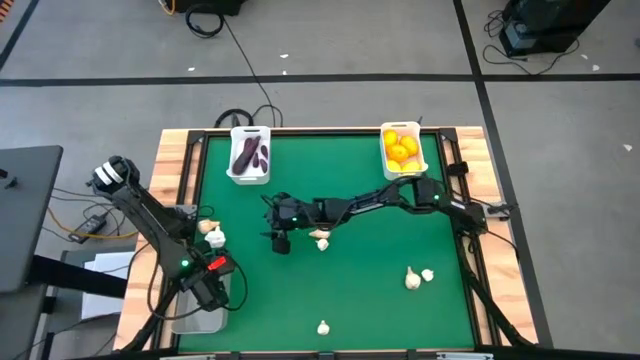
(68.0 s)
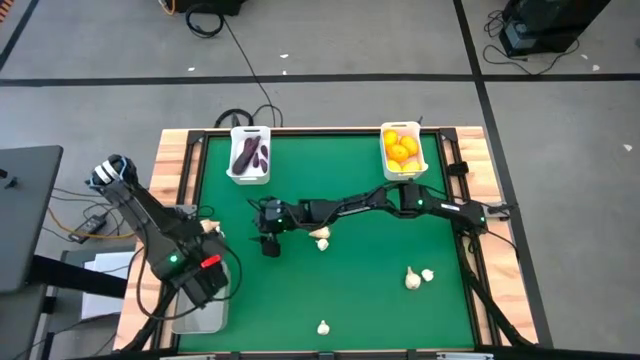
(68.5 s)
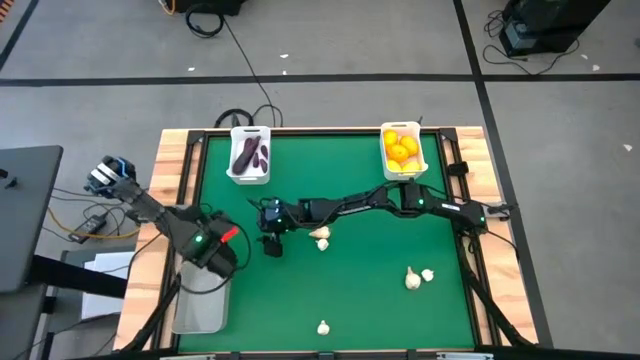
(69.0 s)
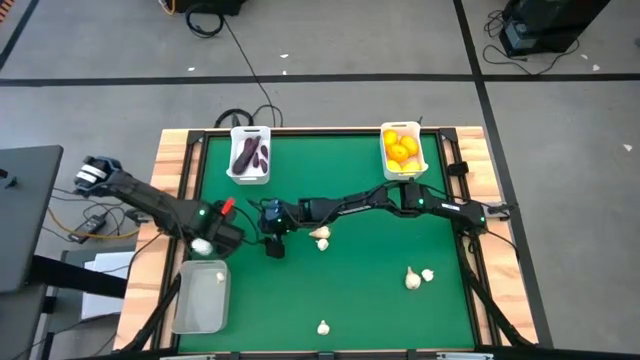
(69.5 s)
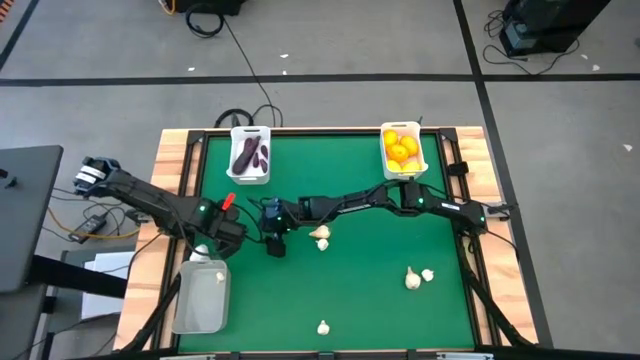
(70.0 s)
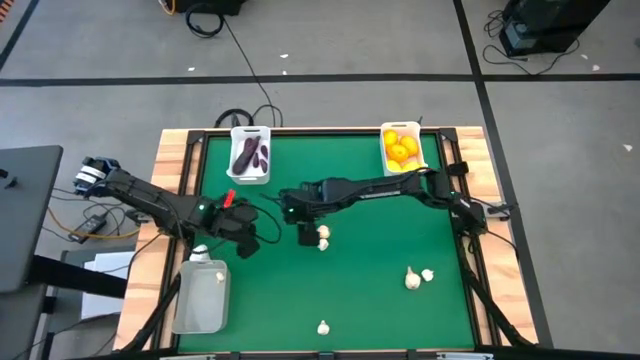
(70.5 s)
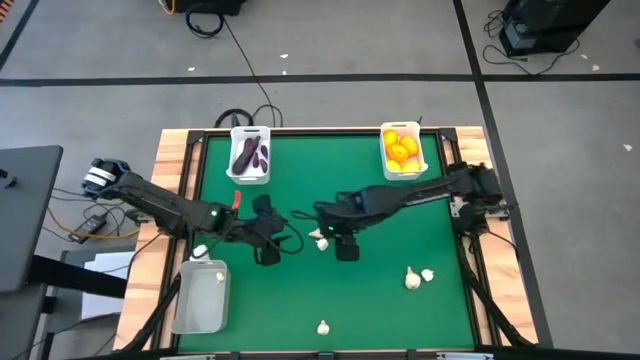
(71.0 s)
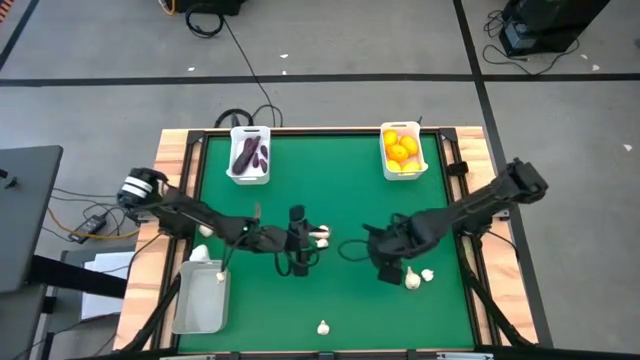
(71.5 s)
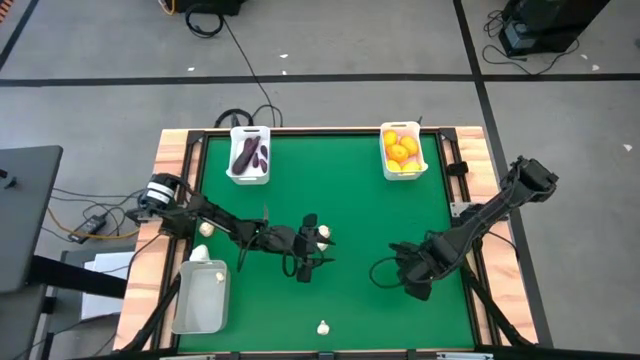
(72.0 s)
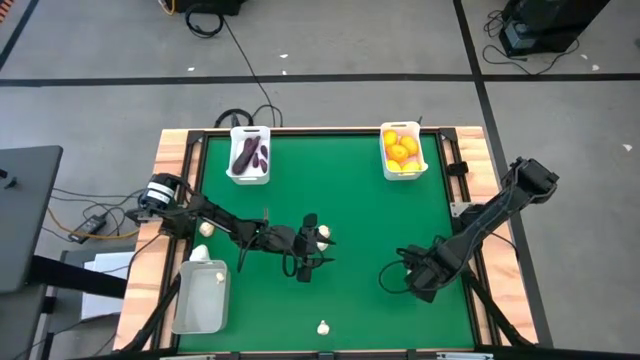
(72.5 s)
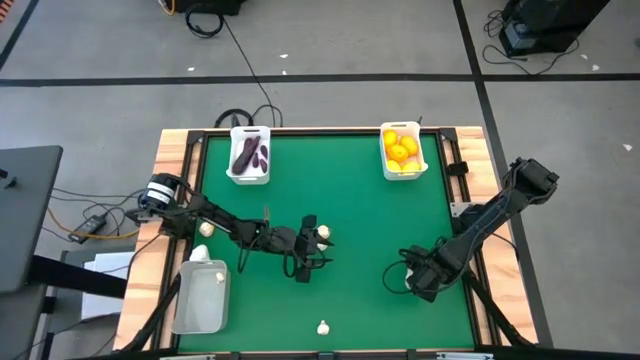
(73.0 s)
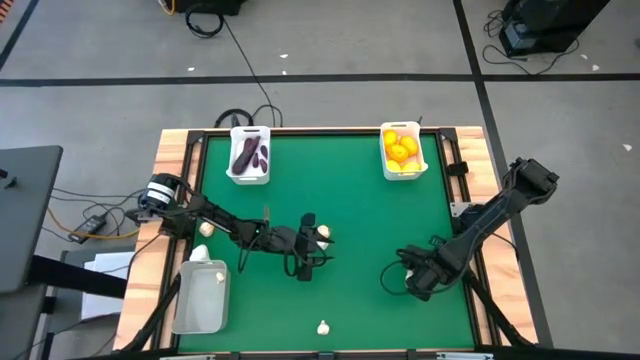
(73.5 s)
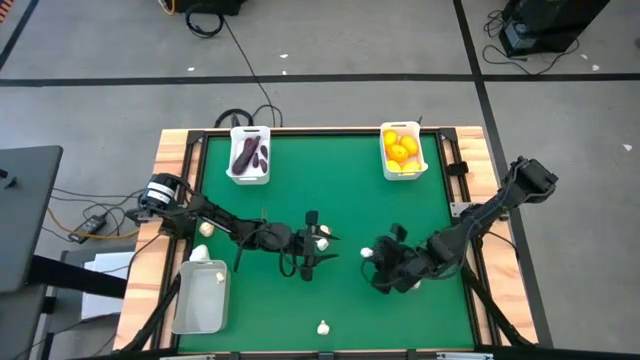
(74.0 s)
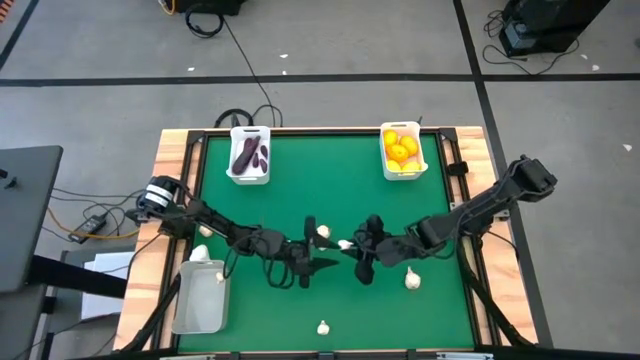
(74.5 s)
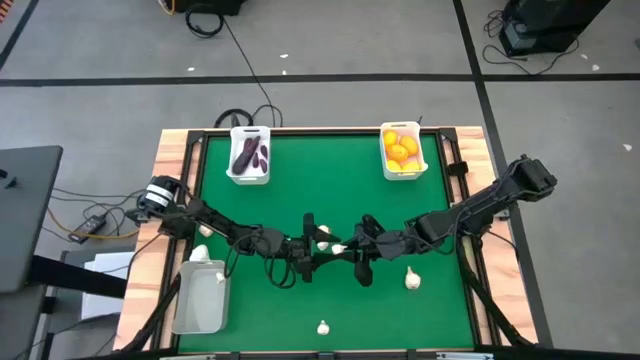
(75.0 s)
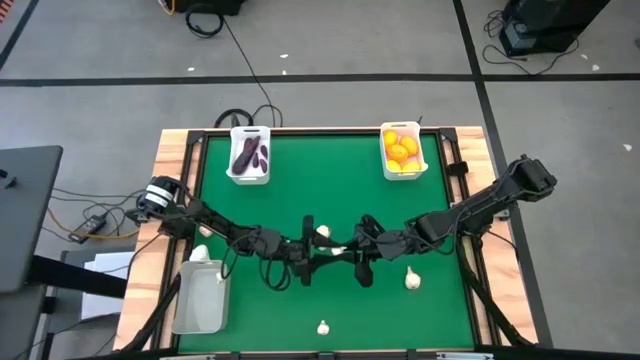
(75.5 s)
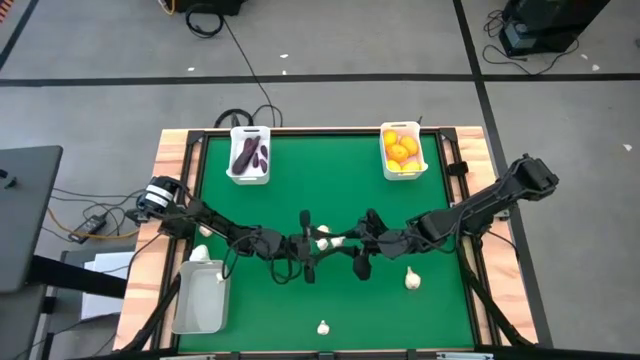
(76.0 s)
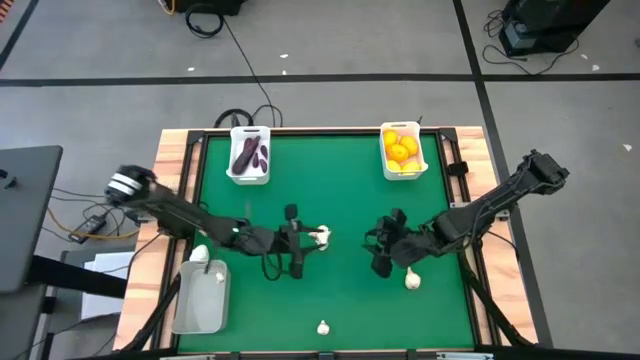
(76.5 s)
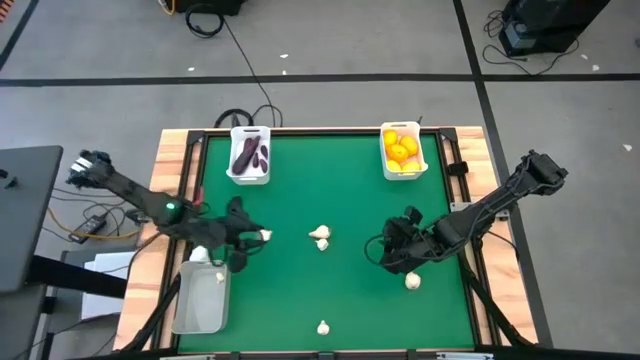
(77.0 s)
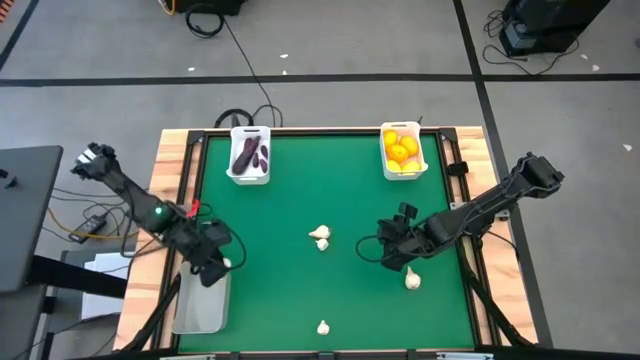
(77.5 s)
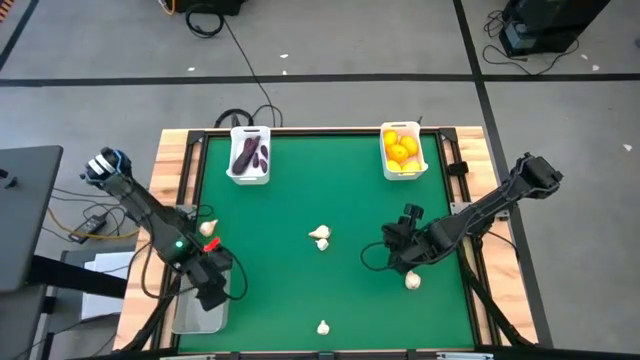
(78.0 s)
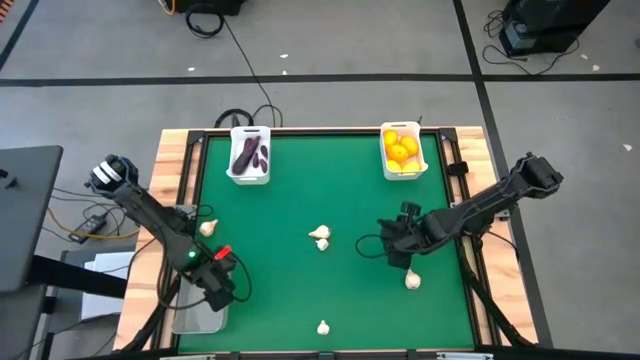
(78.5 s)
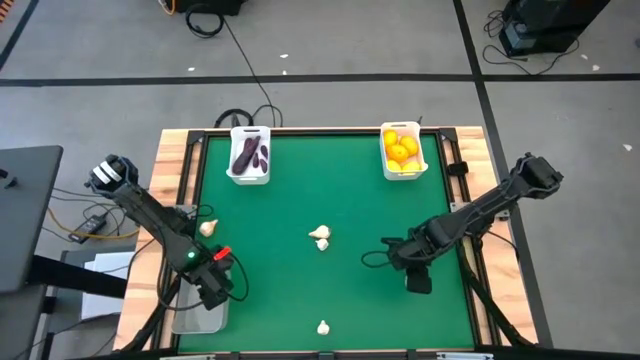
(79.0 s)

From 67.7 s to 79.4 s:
Task: Sort produce into baskets
Put the middle right small garlic into the gray bin

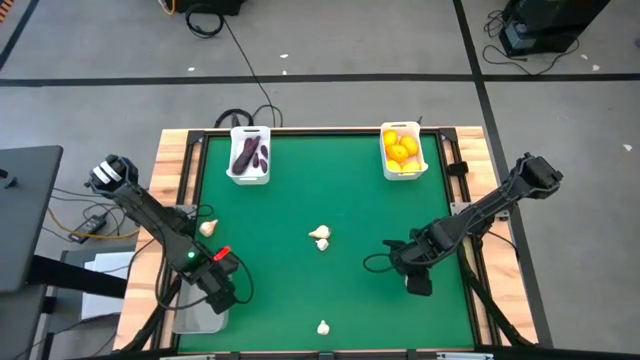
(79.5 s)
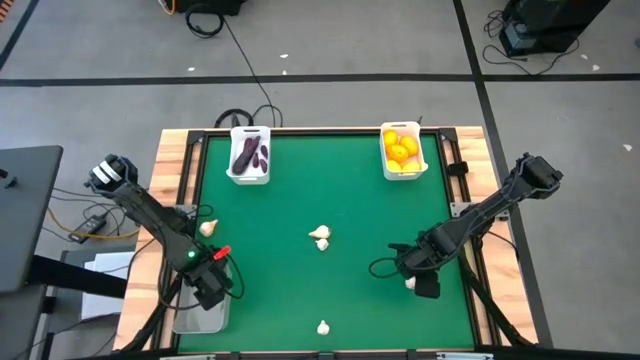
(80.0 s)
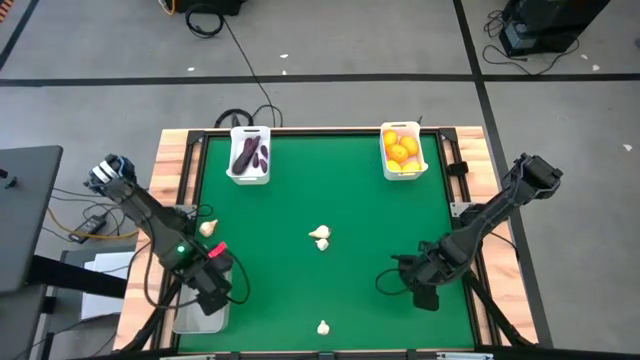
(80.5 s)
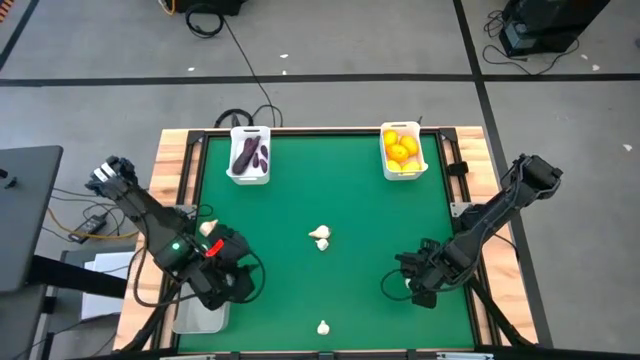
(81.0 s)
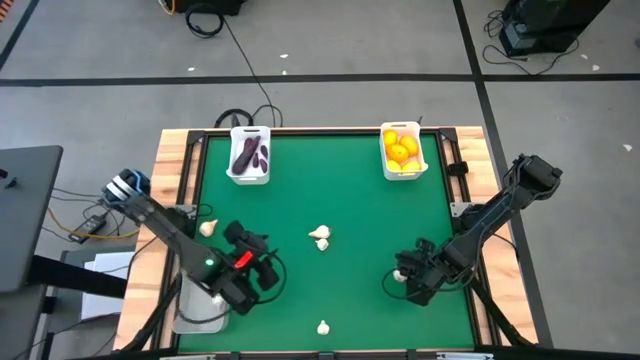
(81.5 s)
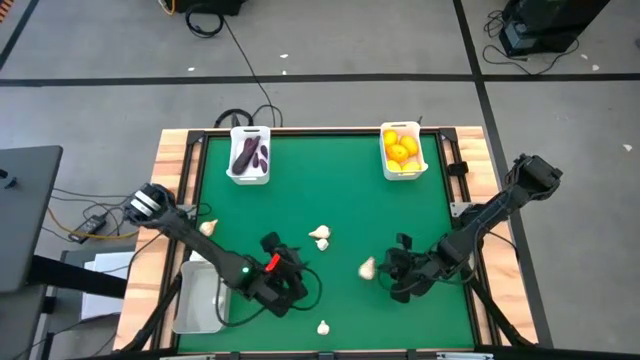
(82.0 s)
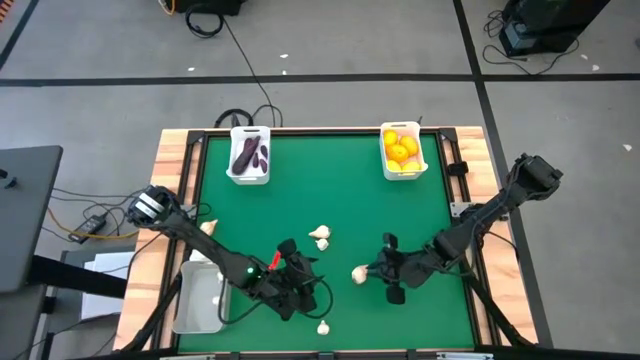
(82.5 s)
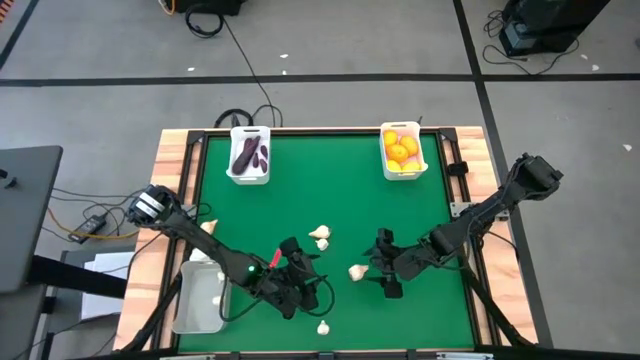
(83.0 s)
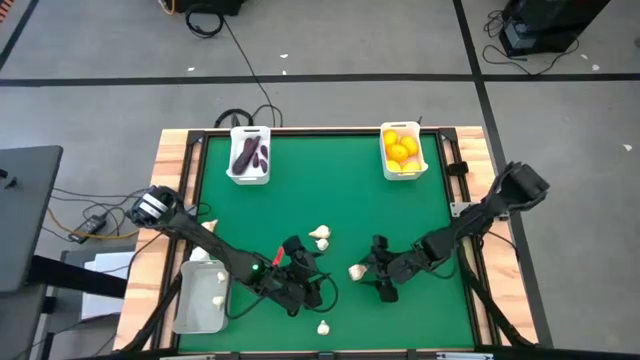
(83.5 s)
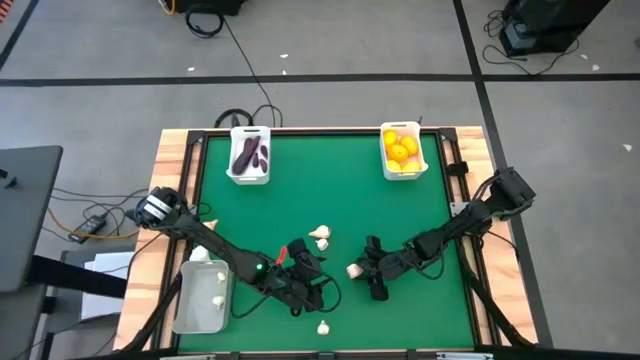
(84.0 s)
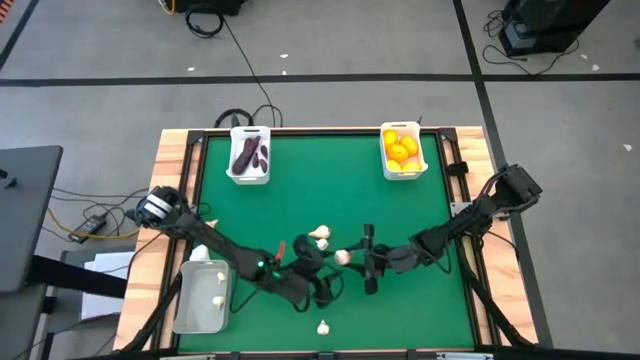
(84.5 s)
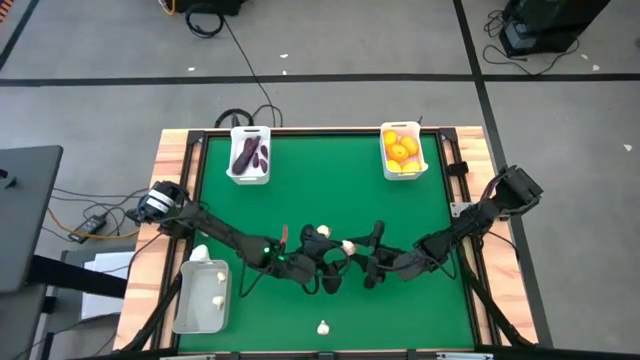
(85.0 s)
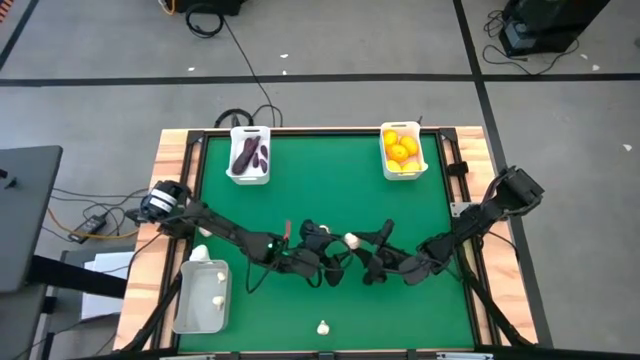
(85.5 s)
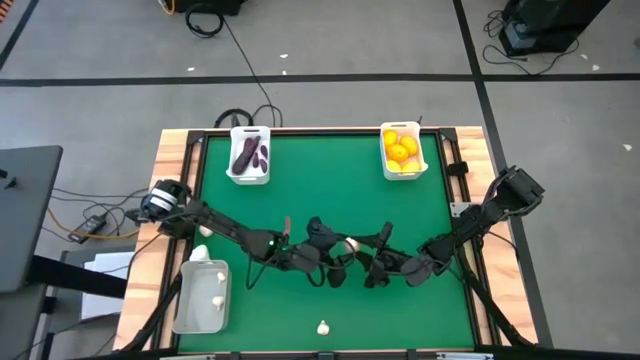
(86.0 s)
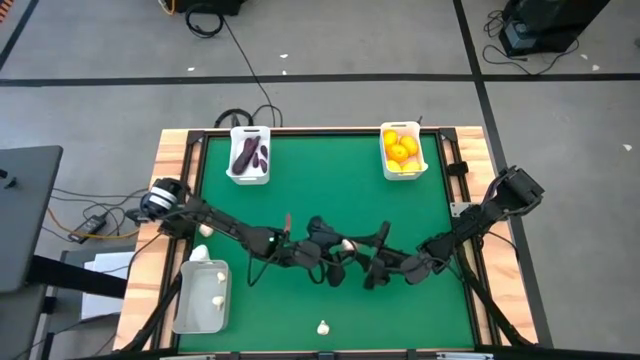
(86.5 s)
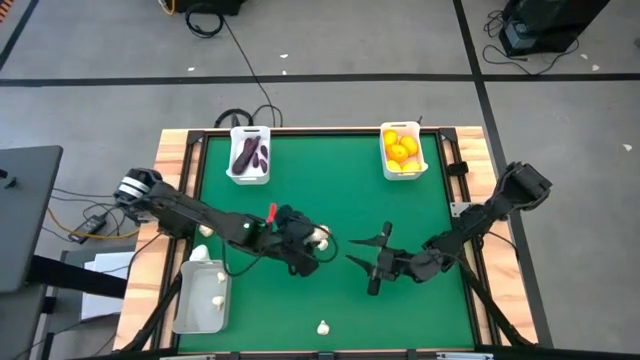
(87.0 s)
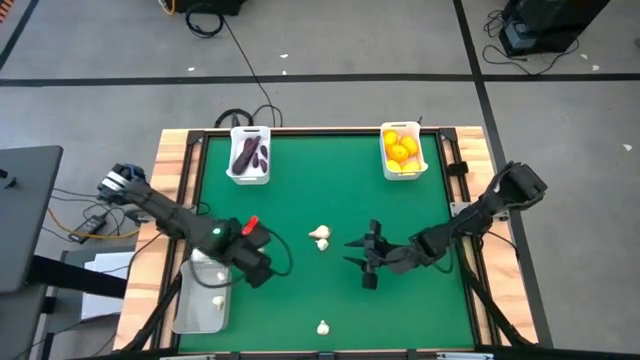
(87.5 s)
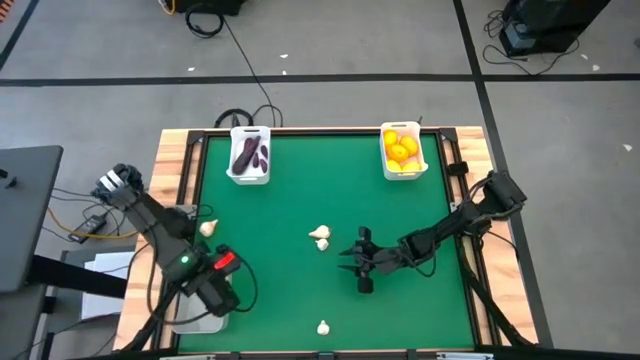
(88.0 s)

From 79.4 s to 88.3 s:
Put the middle right big garlic into the gray bin

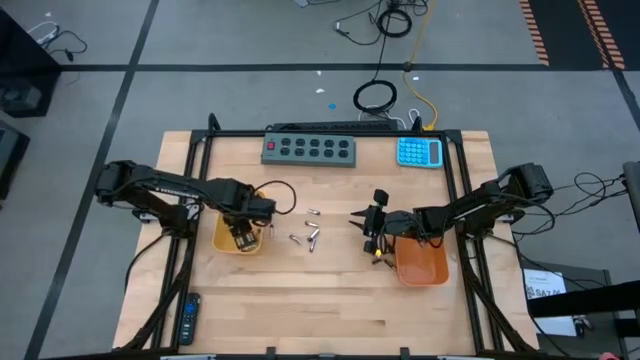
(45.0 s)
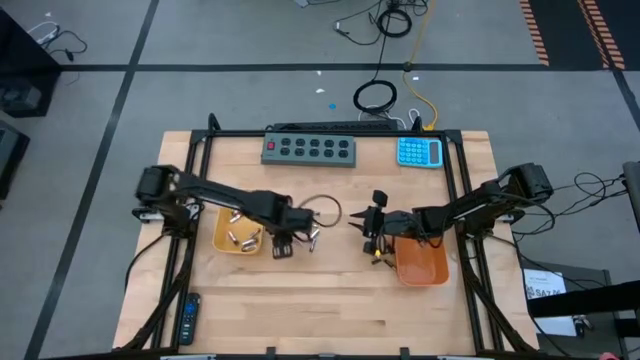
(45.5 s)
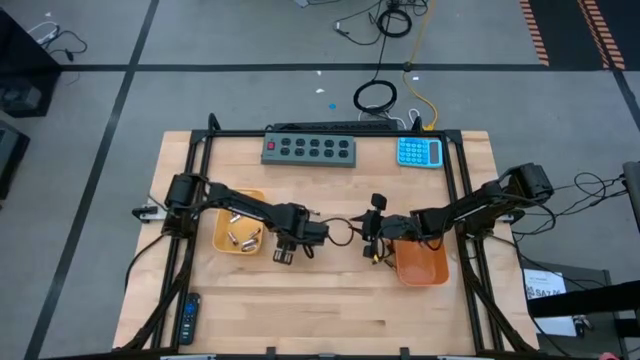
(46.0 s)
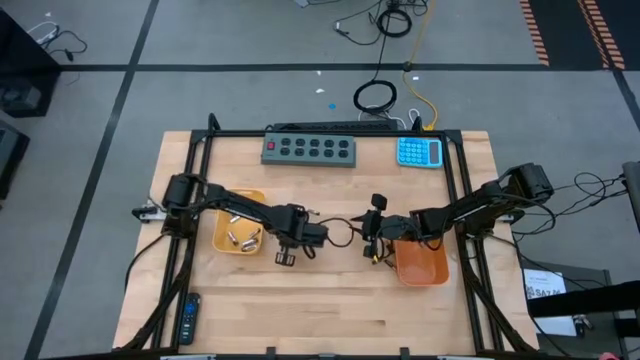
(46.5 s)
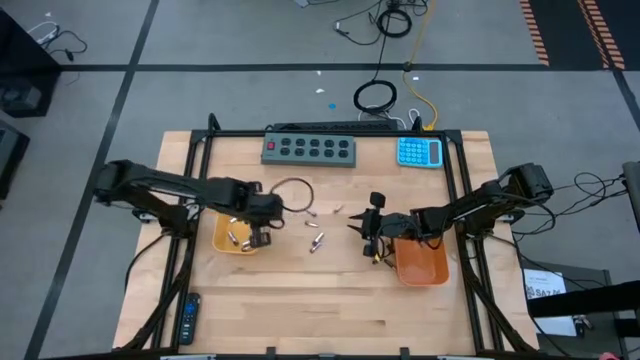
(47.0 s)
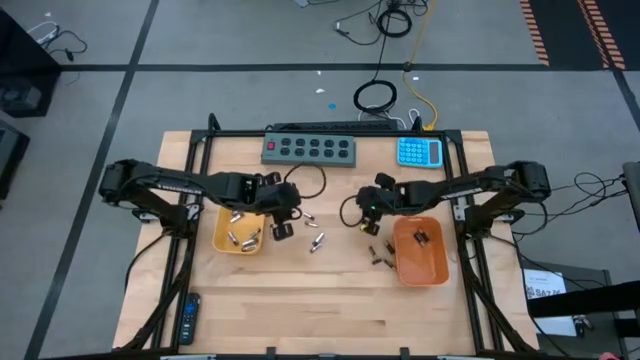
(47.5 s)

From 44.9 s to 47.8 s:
Task: Sort batteries
Put the silver battery into the yellow bin
